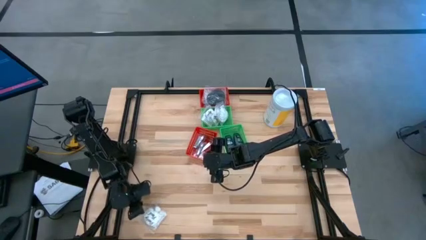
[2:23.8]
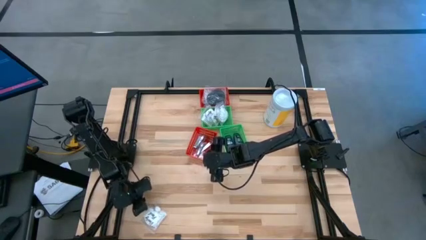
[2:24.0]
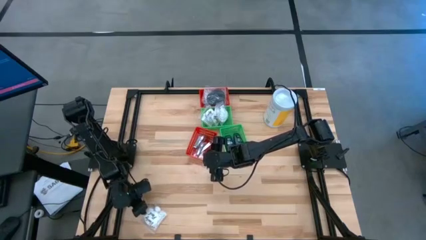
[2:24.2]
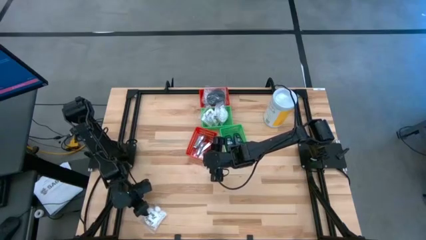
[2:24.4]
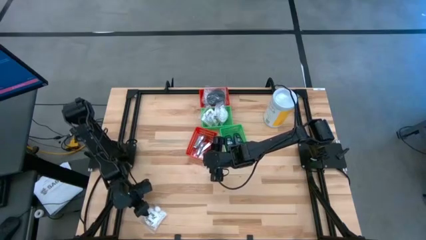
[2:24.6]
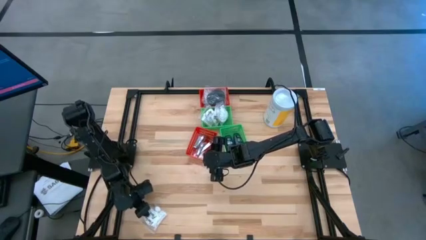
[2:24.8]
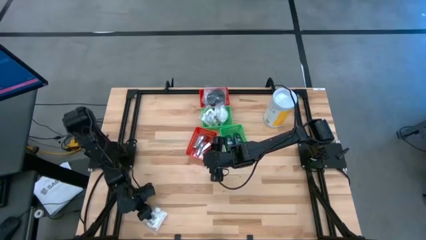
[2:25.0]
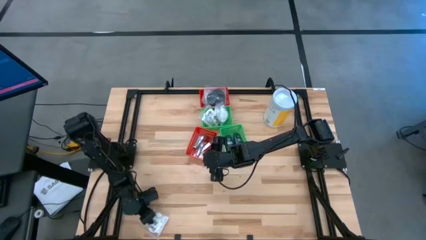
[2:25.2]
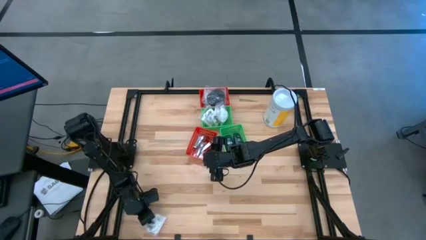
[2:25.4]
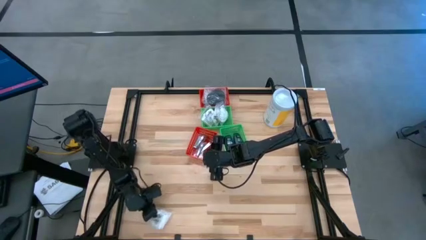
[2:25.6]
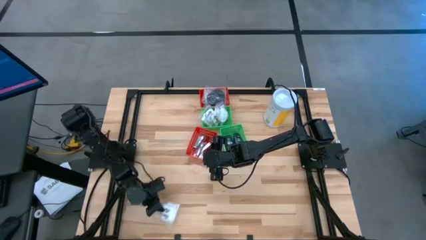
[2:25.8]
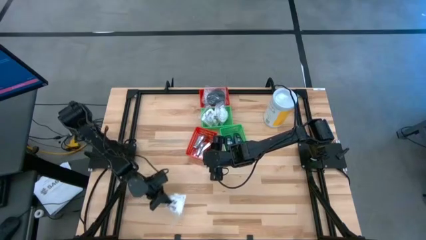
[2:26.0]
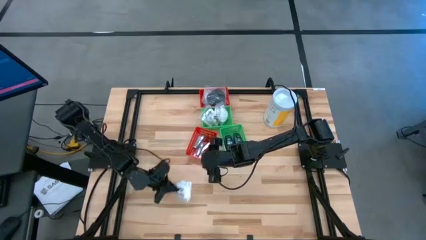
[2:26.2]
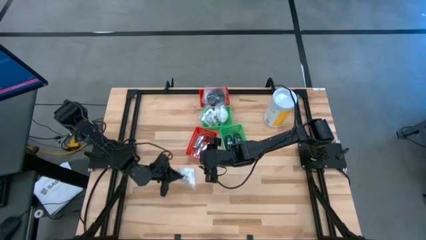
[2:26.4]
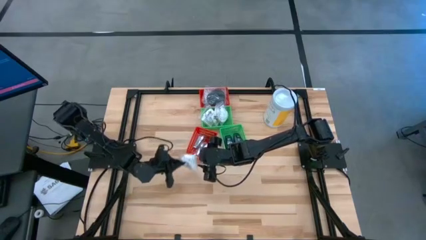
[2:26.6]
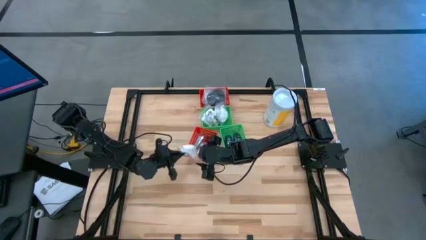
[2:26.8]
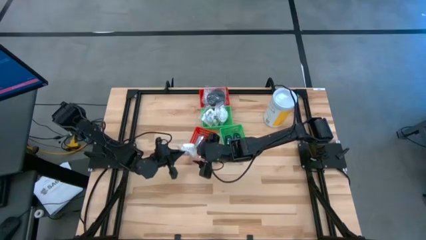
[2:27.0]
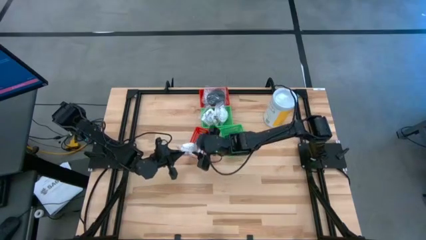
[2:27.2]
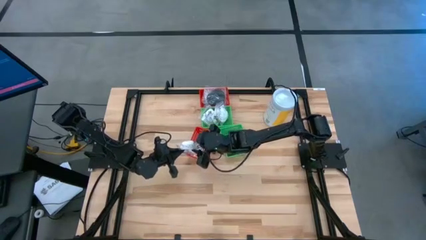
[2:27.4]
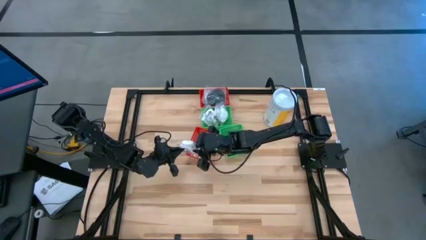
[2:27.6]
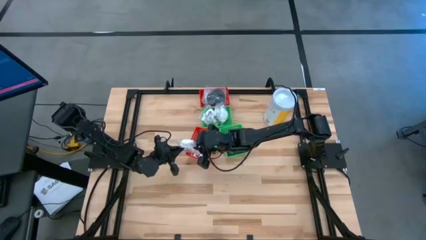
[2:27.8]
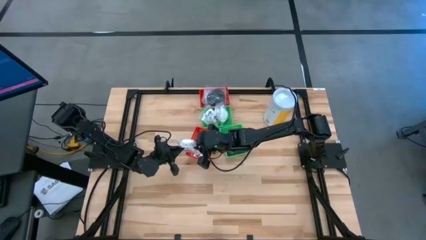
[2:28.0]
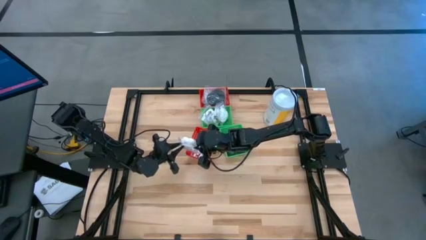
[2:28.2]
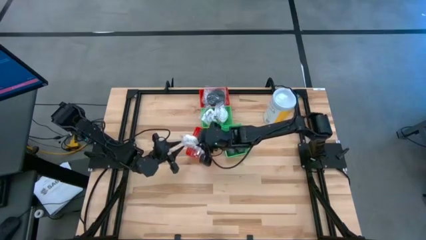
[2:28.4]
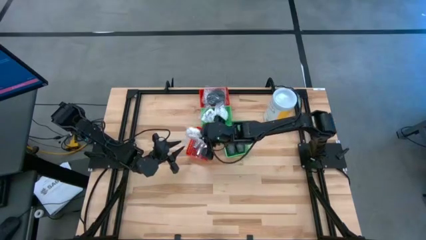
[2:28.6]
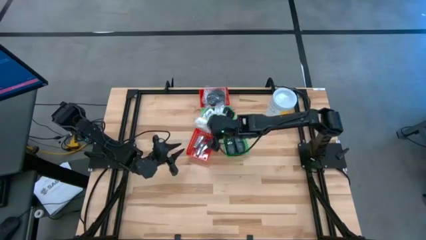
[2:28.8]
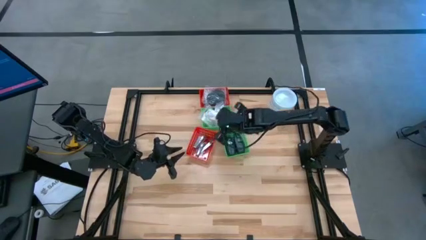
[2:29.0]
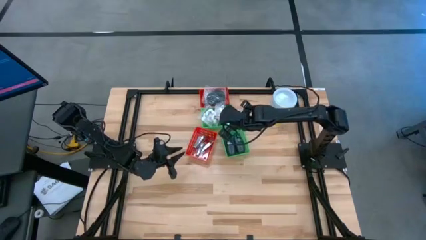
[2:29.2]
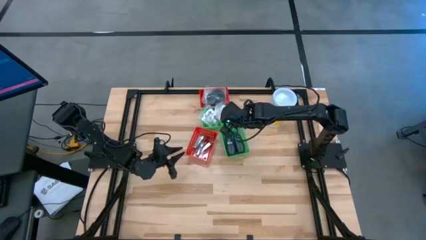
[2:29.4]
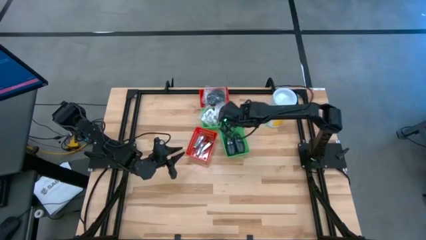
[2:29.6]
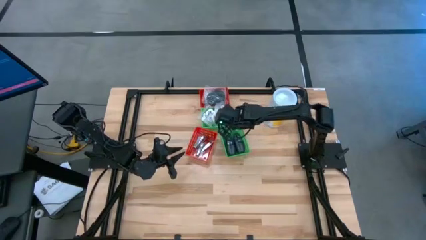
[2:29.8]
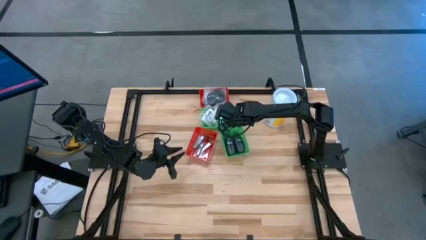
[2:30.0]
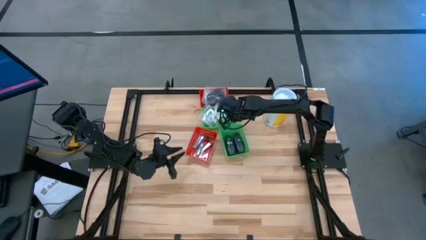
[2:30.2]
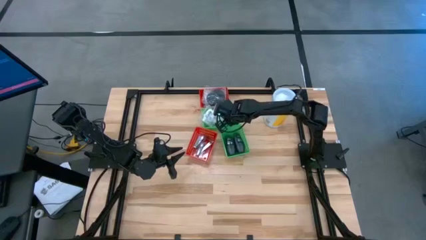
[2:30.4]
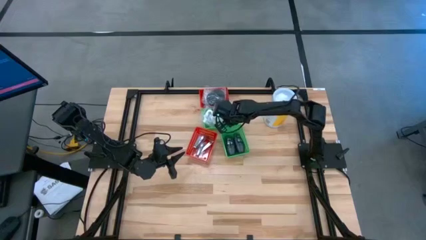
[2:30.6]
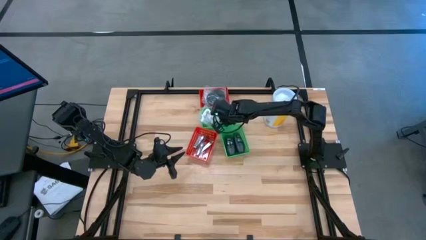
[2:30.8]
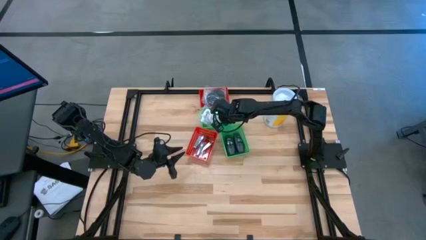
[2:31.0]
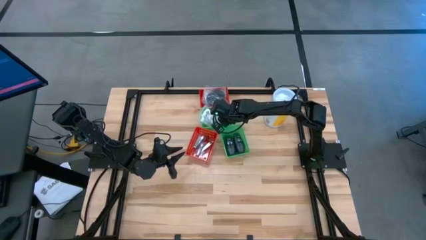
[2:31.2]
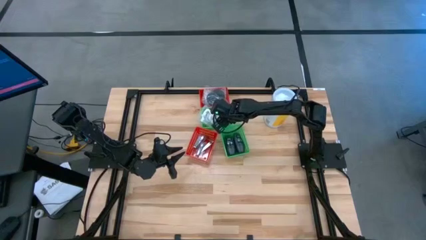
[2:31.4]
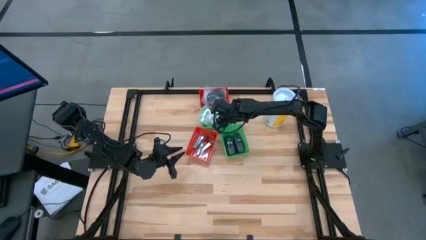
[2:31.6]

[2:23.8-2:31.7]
Task: Pick & Place Travel size toiletries
Put the white cotton pack into the top green bin

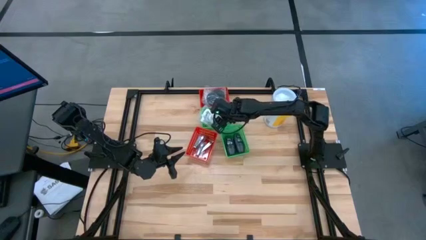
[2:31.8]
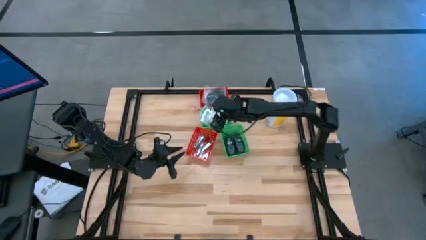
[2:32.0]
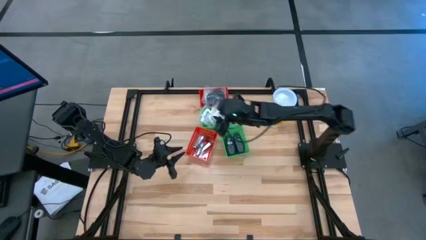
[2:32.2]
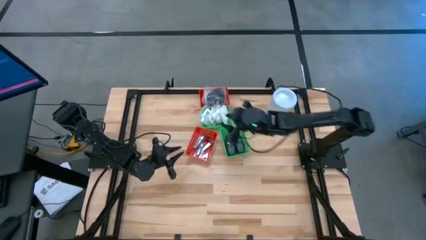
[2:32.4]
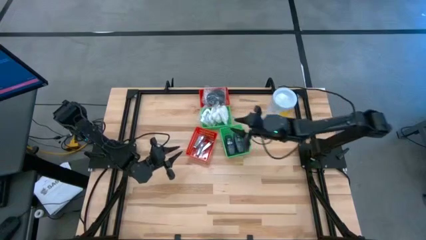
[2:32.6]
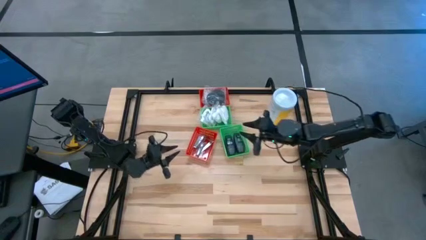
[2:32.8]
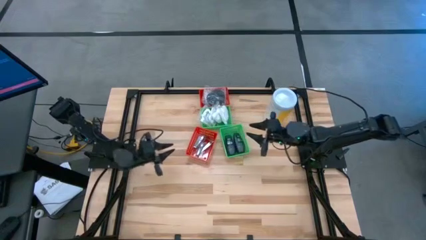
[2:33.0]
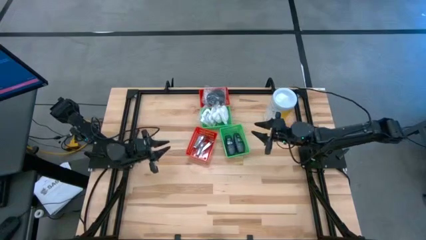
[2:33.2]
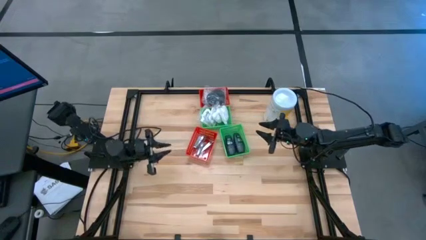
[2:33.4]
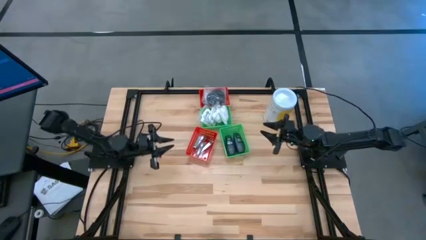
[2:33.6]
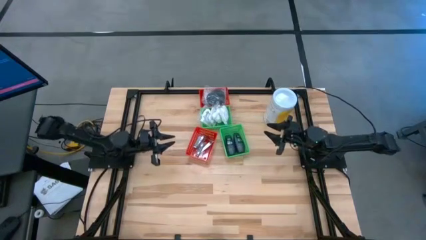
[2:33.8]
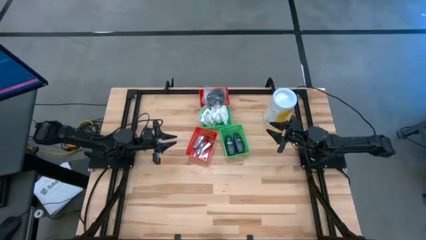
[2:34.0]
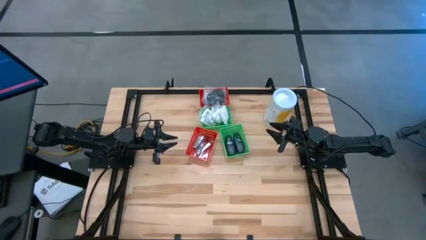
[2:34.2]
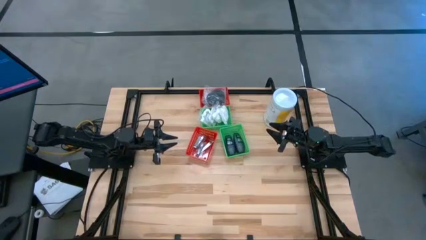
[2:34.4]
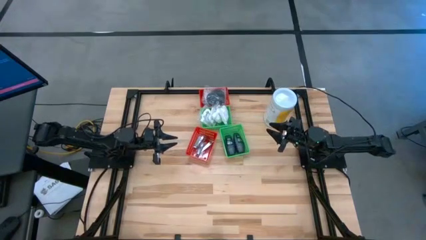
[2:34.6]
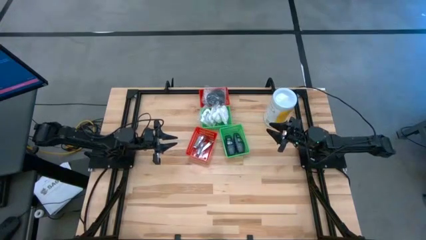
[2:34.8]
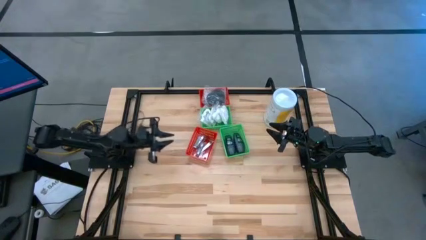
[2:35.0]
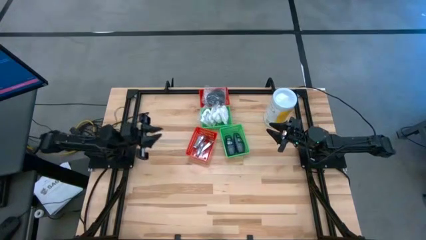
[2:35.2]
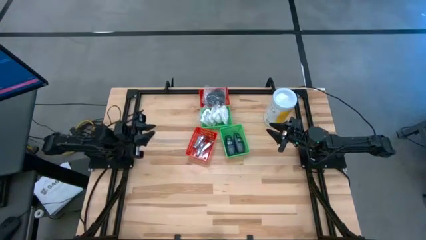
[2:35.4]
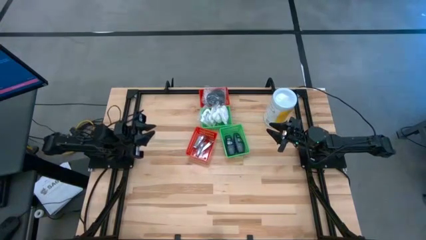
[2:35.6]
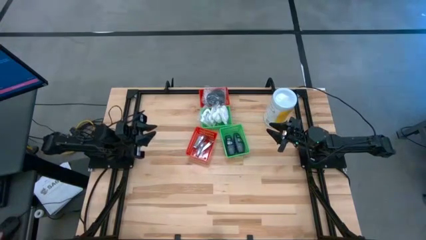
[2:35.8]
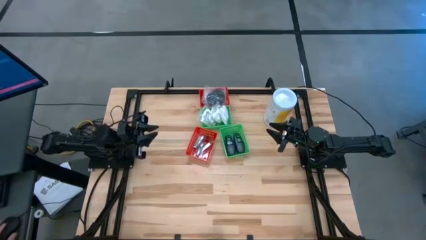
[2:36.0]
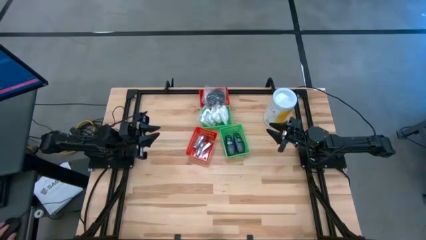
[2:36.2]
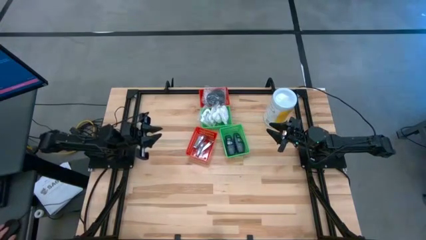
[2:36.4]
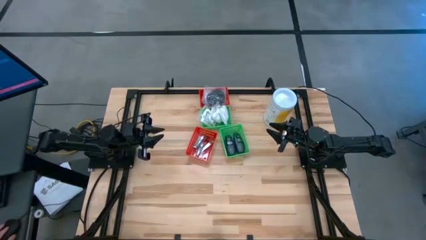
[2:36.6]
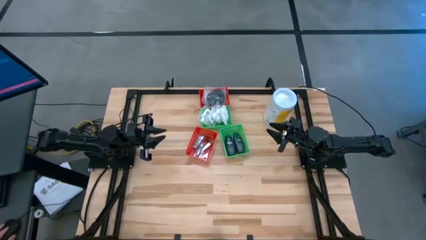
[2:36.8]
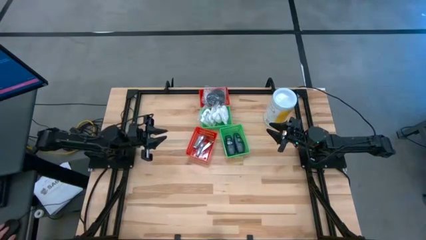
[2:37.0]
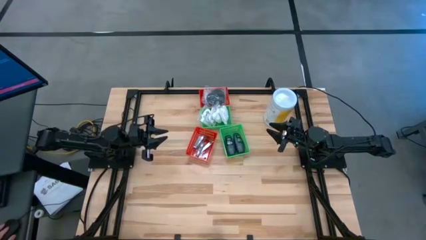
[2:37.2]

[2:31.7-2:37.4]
Return to Home Position
